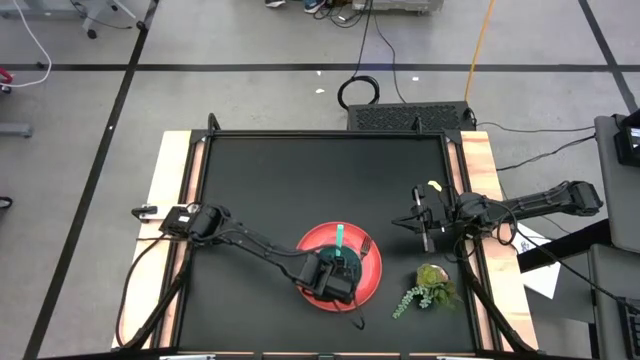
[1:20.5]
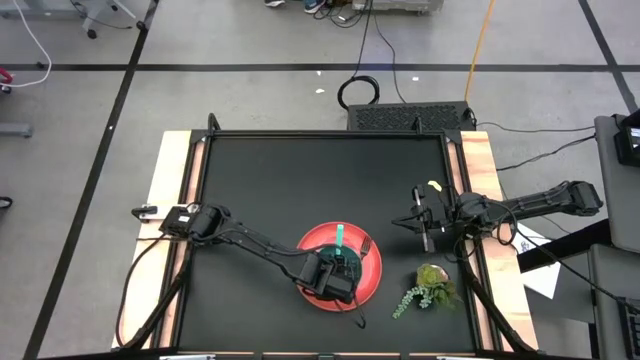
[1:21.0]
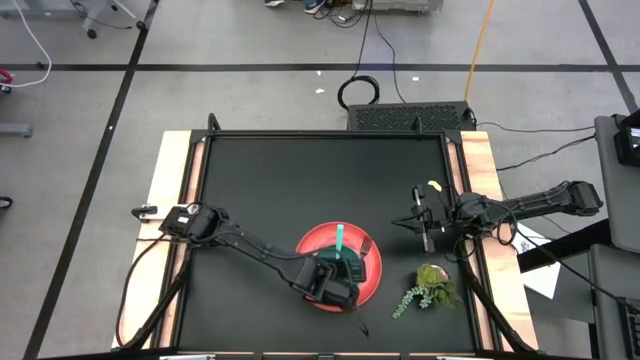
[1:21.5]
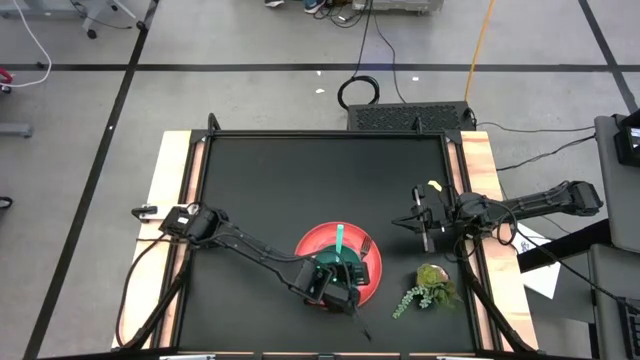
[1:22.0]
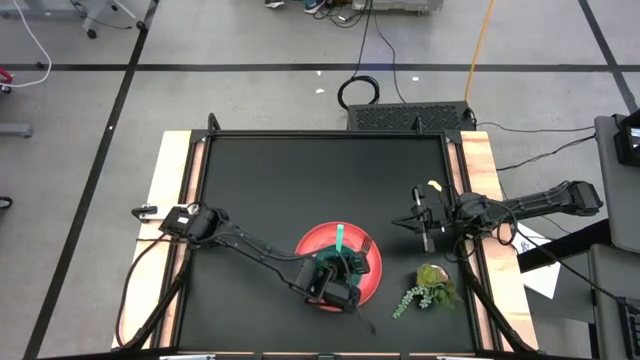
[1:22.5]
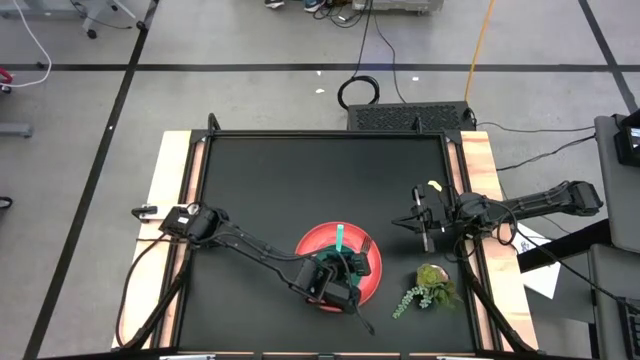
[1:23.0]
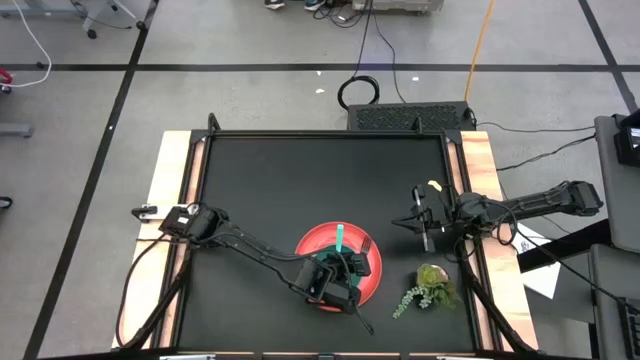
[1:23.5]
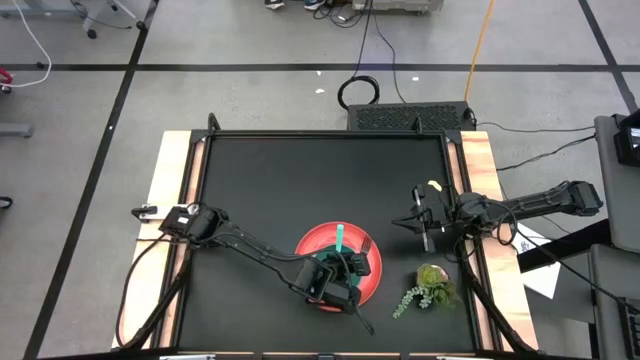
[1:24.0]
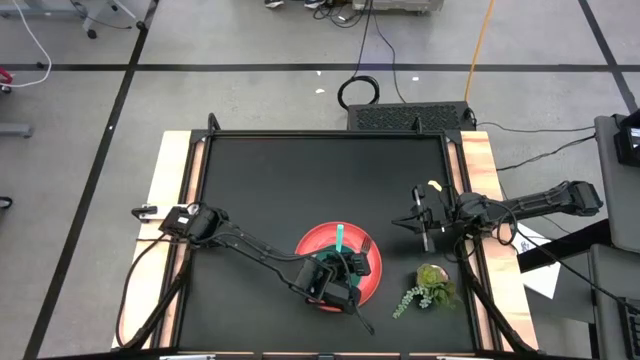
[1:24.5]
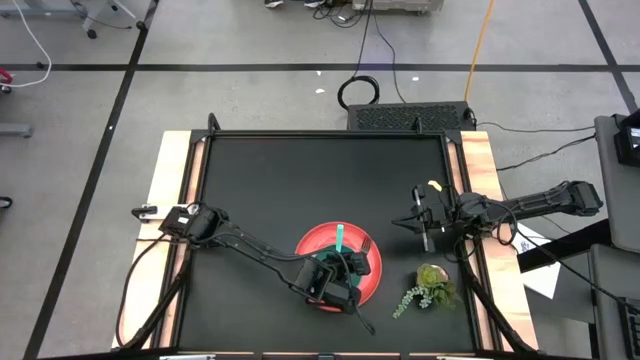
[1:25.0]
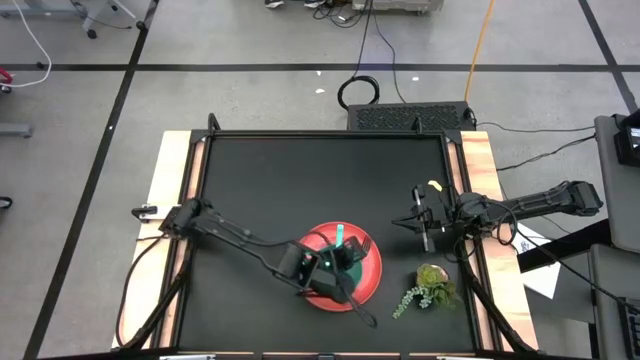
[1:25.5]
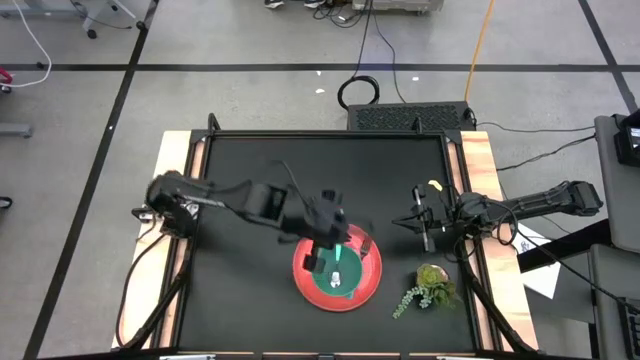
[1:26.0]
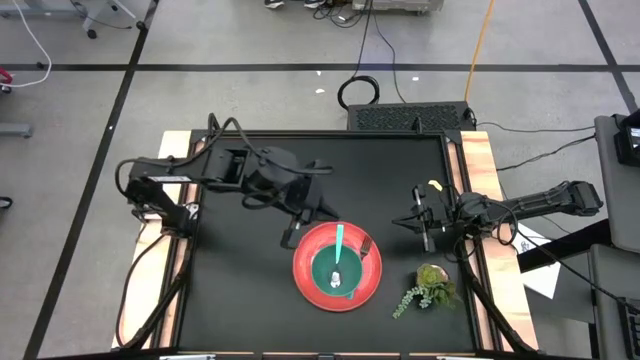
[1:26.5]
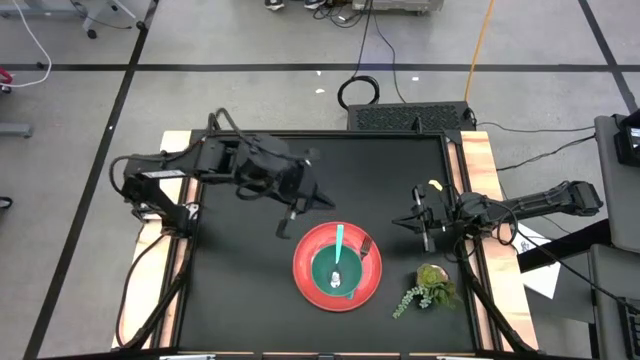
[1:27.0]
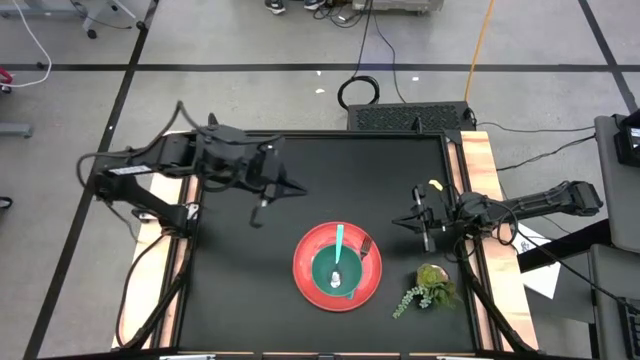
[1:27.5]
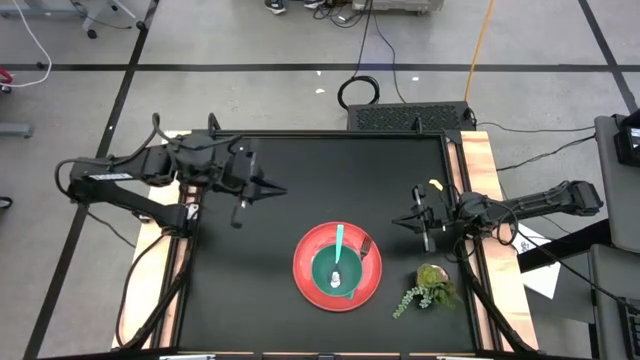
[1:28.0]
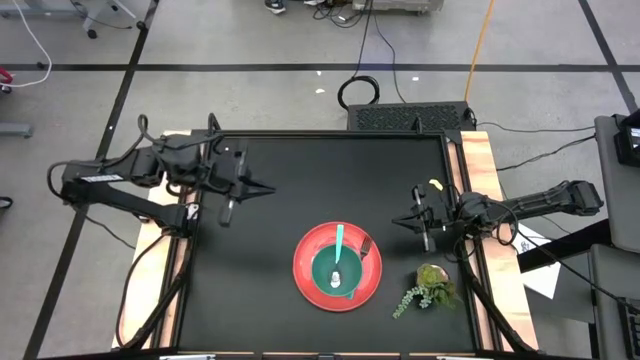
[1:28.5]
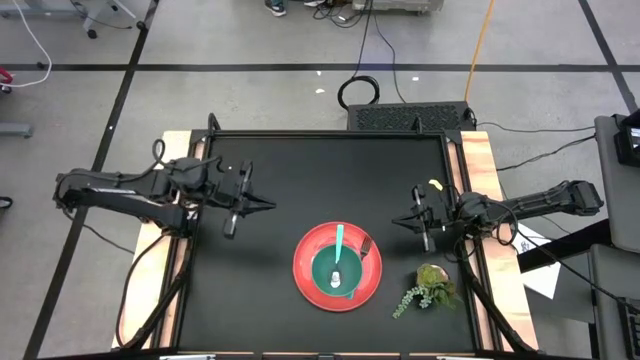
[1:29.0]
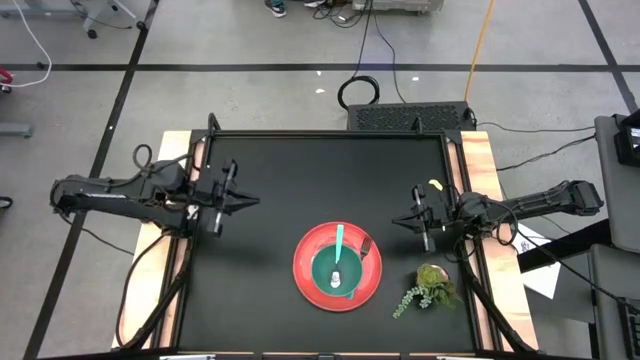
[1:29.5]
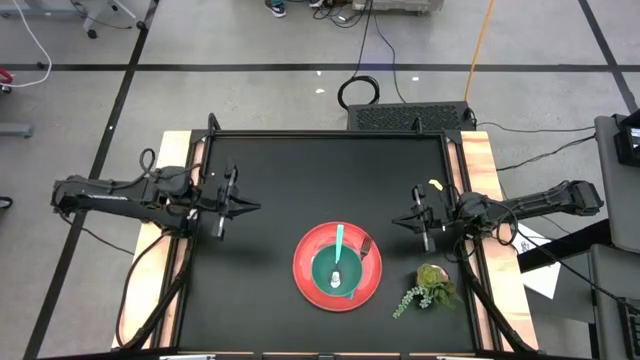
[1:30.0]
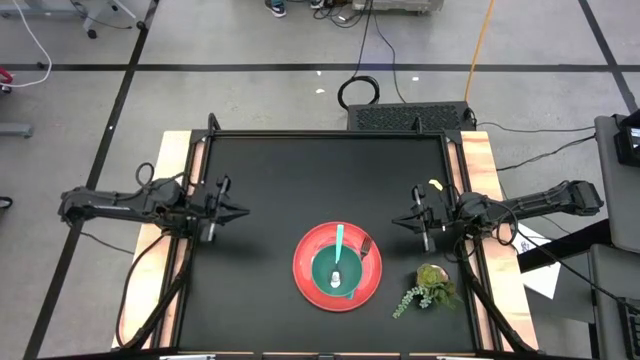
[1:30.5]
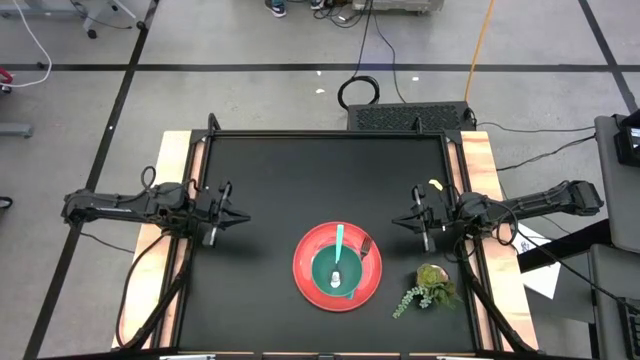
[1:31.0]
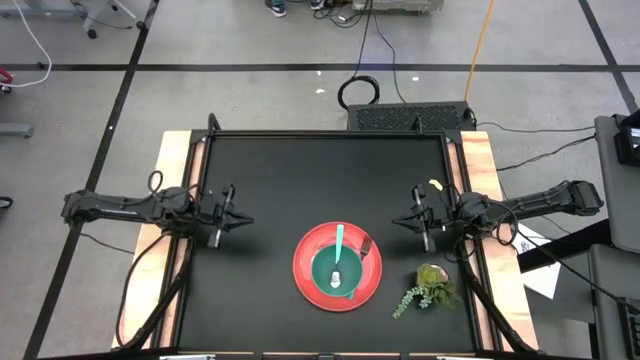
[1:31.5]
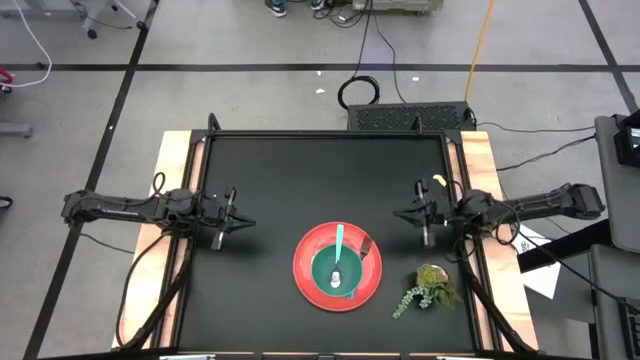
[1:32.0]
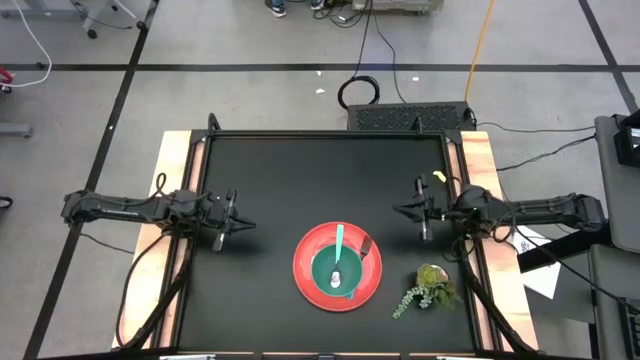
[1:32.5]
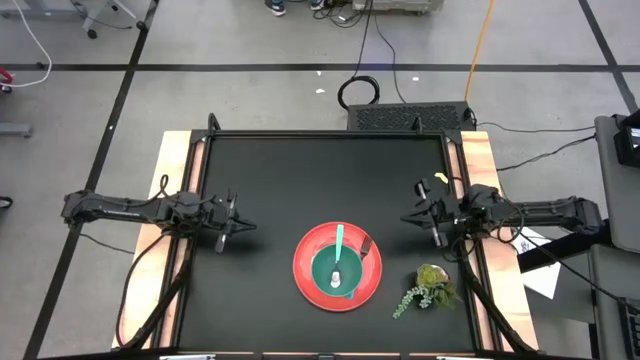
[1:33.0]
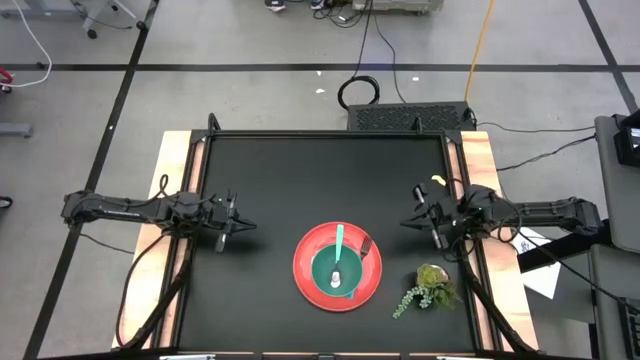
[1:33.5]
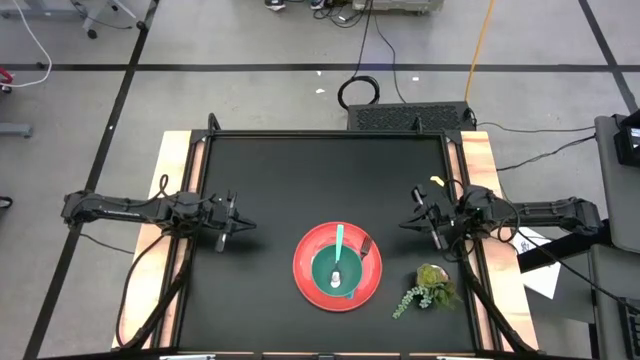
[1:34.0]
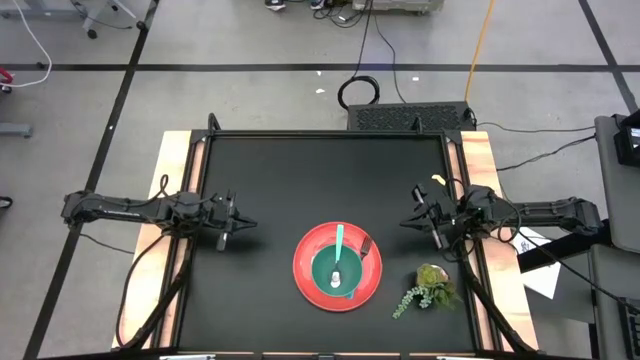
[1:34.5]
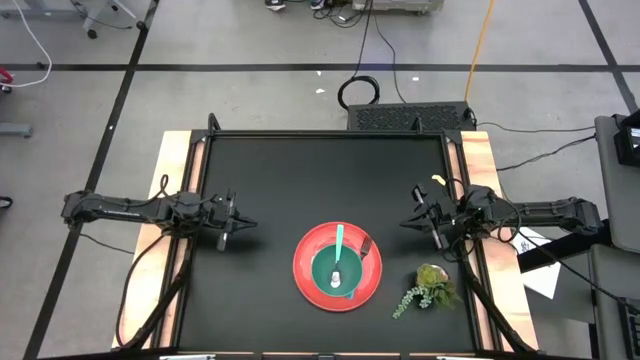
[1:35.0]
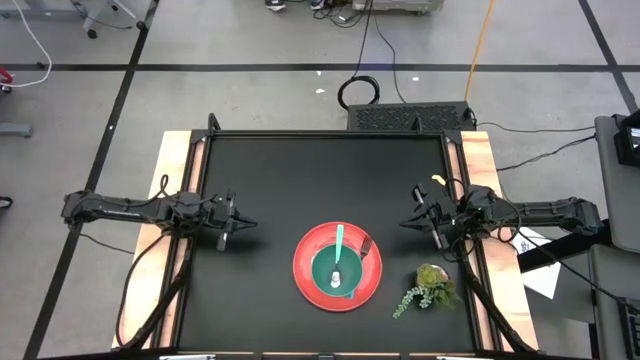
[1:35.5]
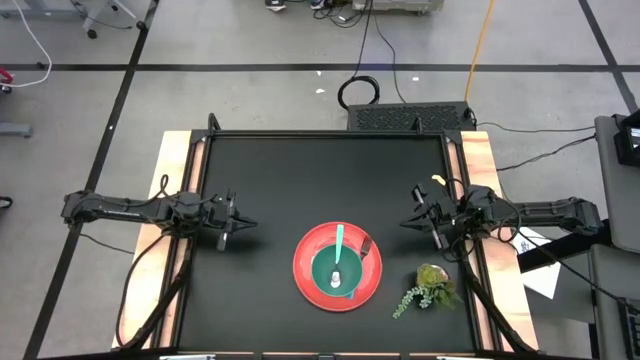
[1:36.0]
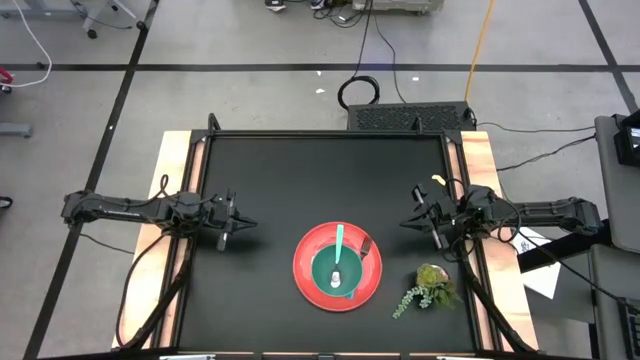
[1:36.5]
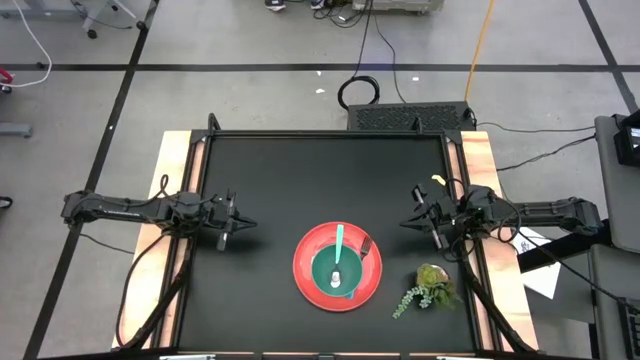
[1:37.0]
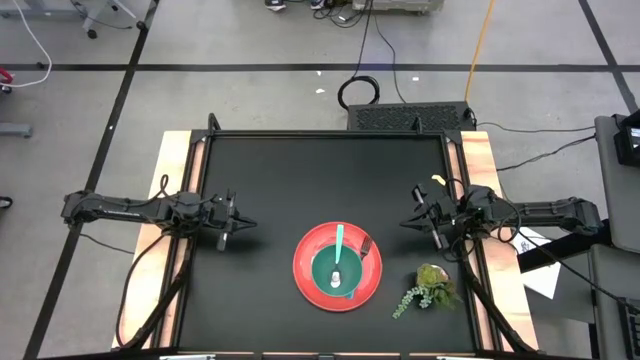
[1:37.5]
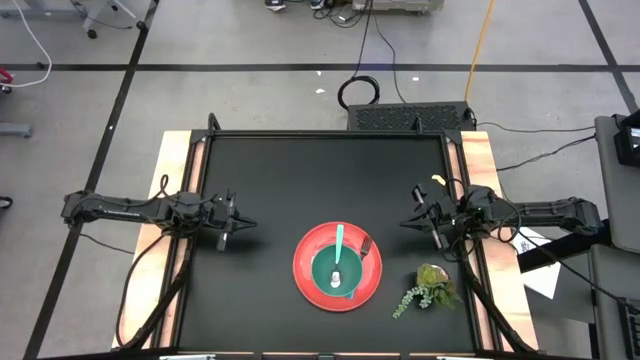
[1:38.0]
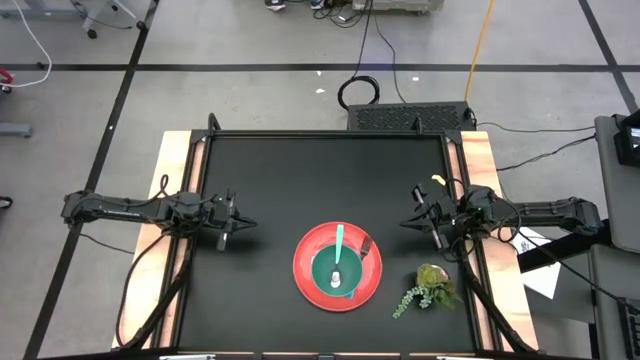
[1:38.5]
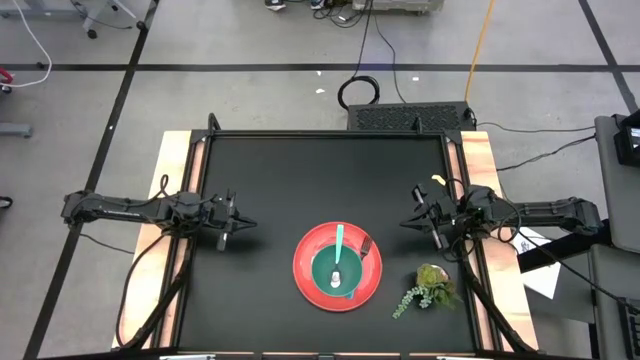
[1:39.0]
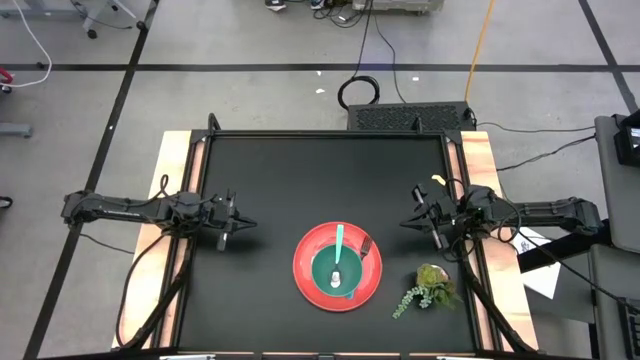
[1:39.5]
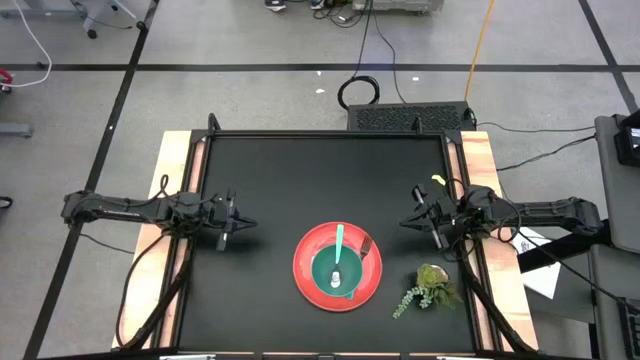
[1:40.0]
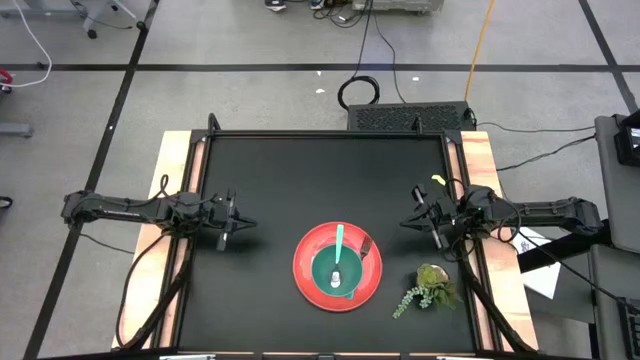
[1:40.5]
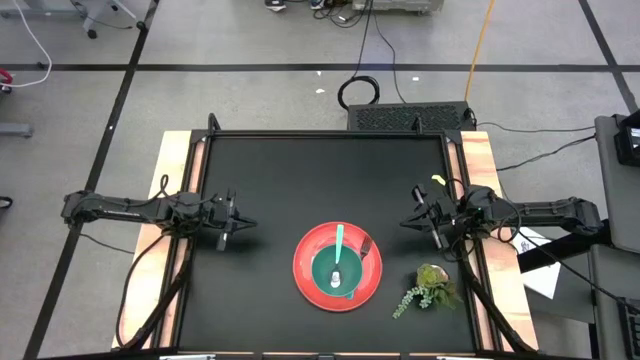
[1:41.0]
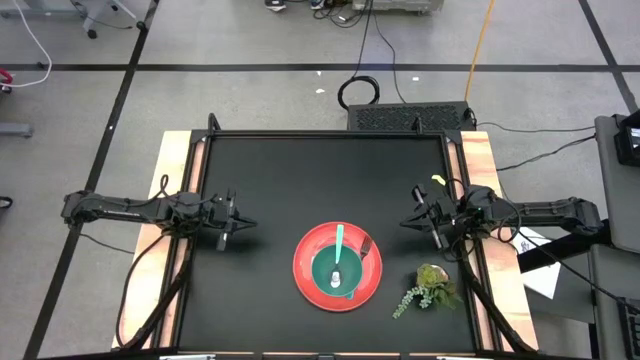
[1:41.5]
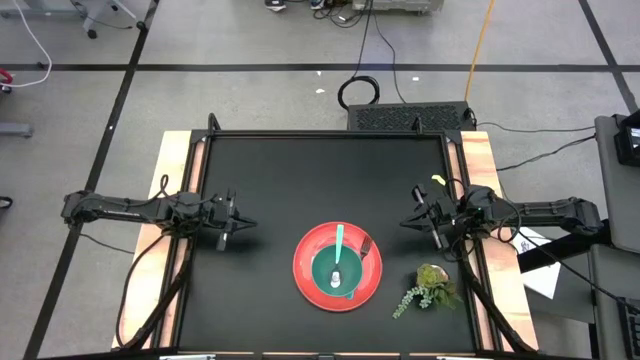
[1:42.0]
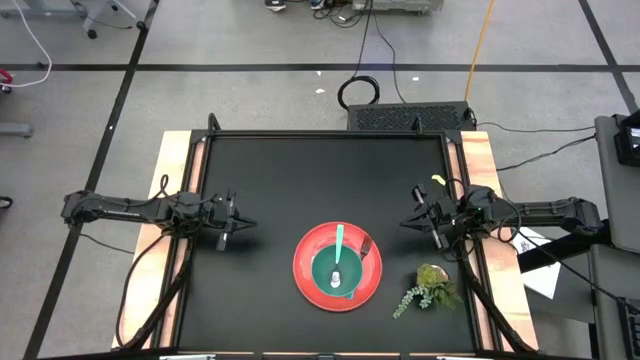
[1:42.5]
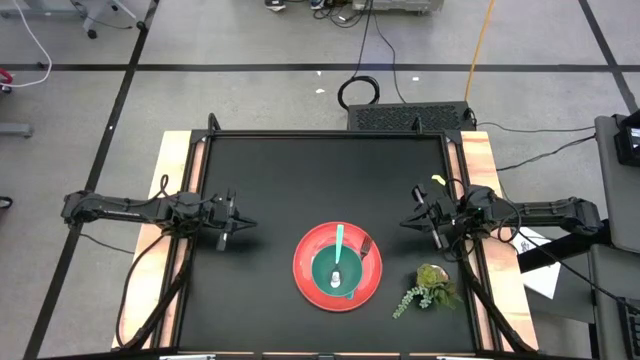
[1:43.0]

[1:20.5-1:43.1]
Task: Set table place
Return to Home Position
